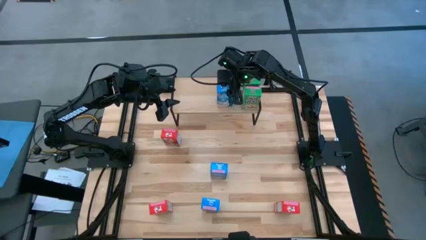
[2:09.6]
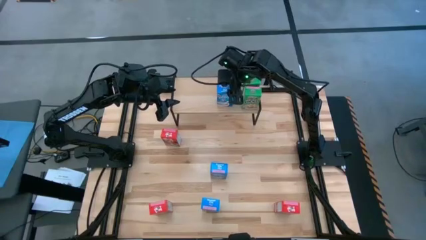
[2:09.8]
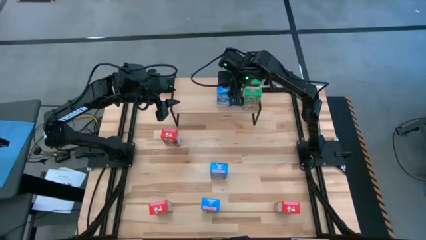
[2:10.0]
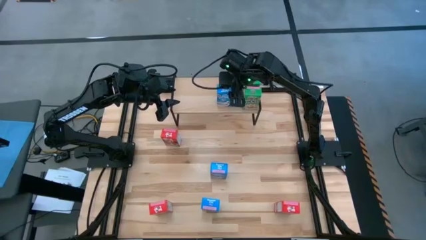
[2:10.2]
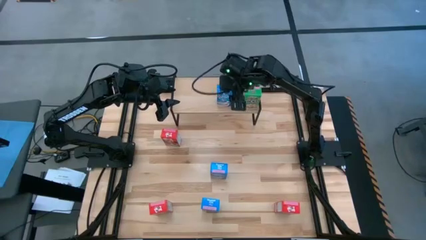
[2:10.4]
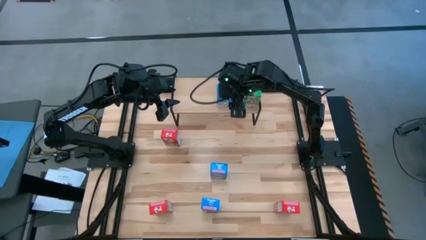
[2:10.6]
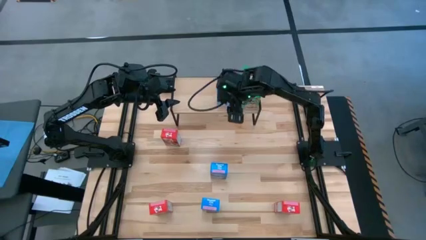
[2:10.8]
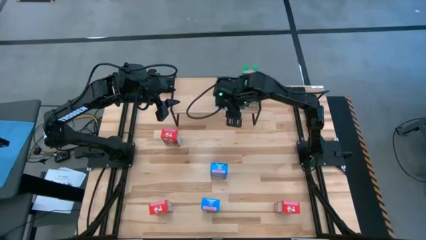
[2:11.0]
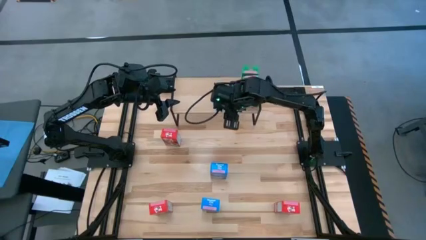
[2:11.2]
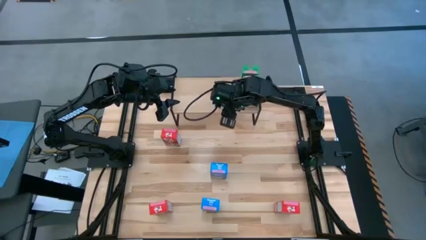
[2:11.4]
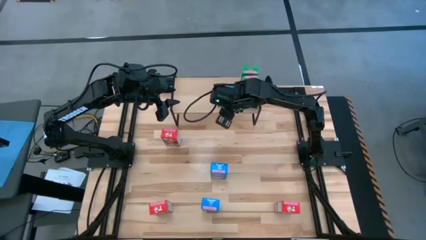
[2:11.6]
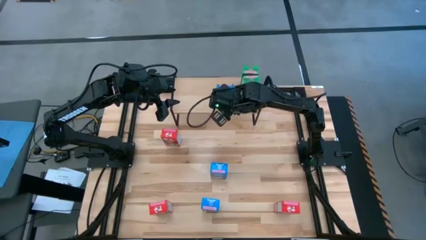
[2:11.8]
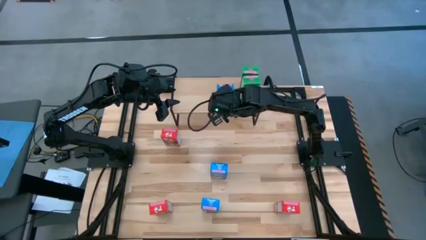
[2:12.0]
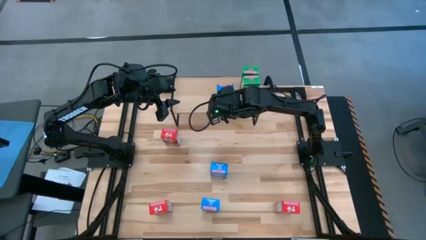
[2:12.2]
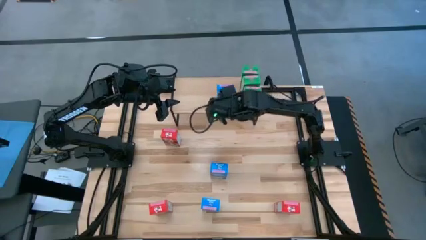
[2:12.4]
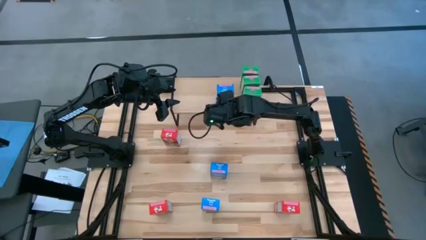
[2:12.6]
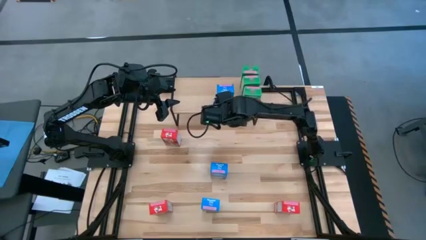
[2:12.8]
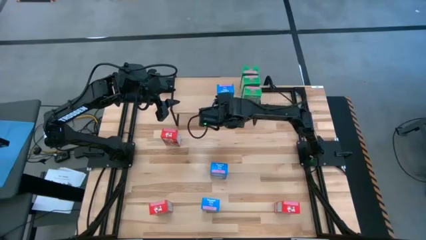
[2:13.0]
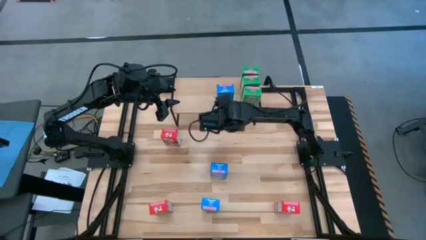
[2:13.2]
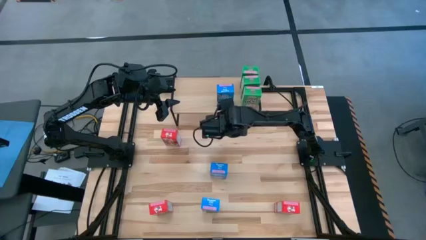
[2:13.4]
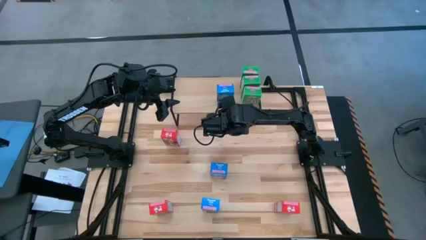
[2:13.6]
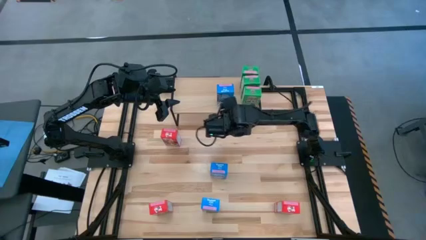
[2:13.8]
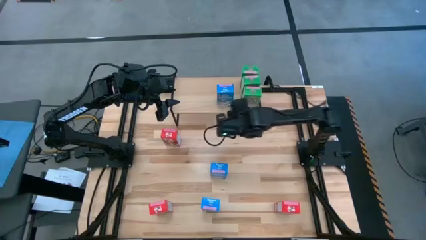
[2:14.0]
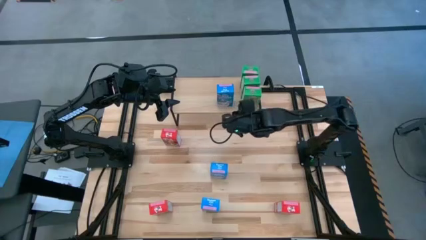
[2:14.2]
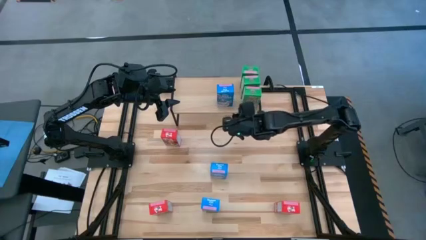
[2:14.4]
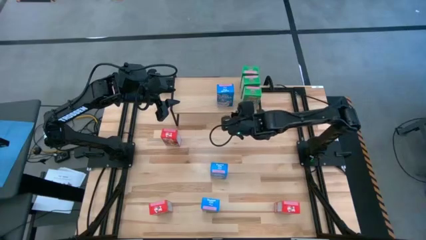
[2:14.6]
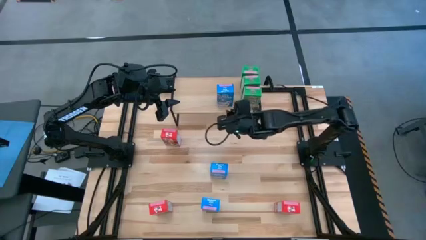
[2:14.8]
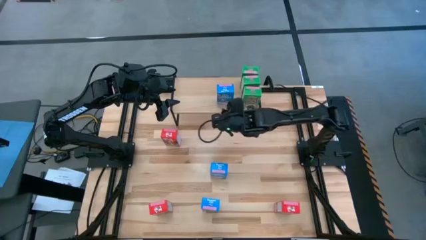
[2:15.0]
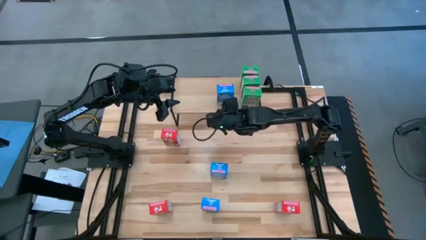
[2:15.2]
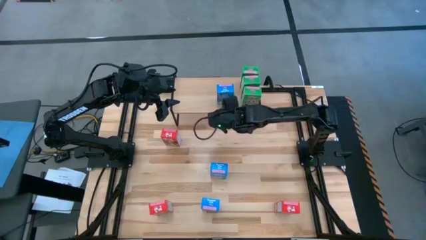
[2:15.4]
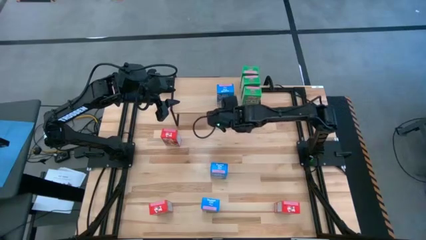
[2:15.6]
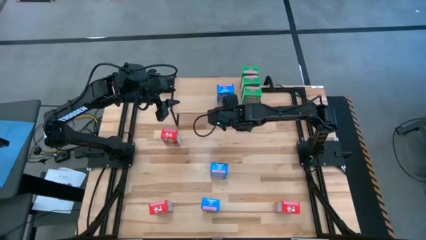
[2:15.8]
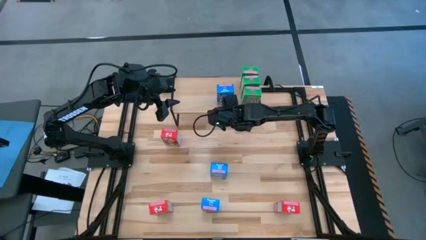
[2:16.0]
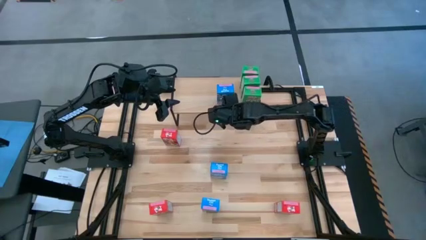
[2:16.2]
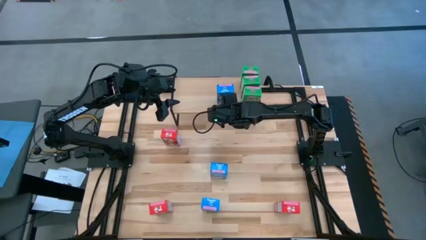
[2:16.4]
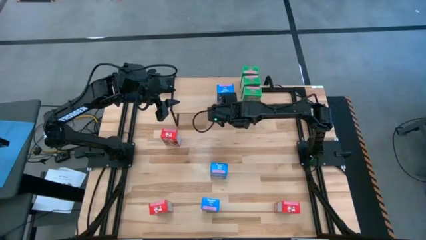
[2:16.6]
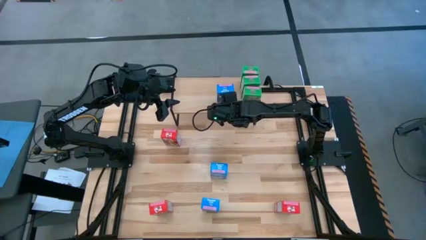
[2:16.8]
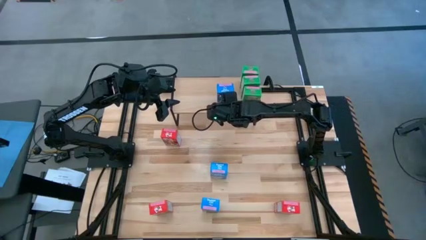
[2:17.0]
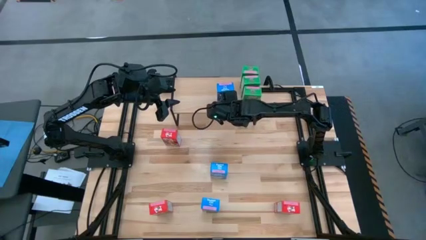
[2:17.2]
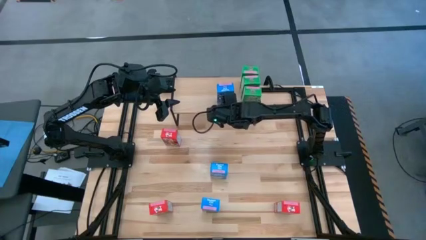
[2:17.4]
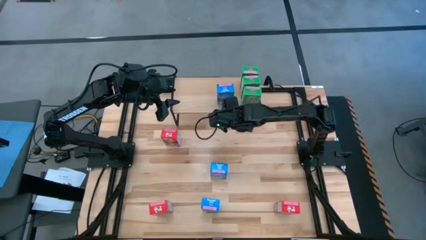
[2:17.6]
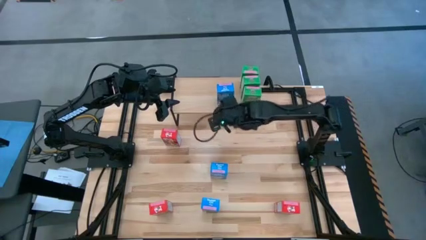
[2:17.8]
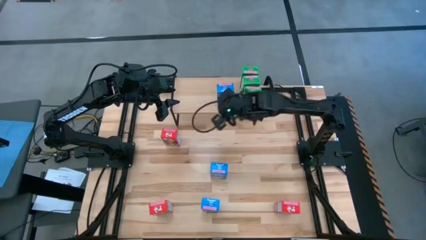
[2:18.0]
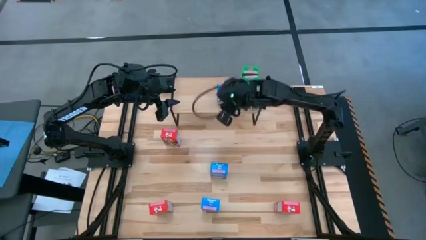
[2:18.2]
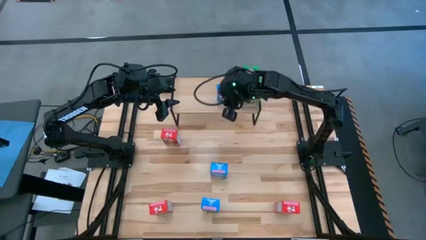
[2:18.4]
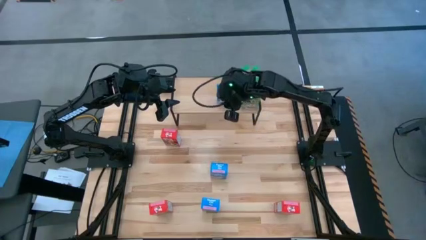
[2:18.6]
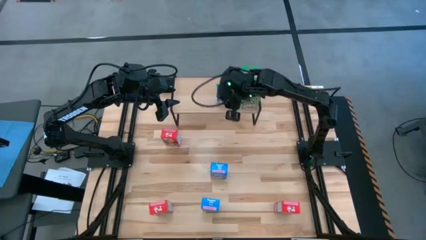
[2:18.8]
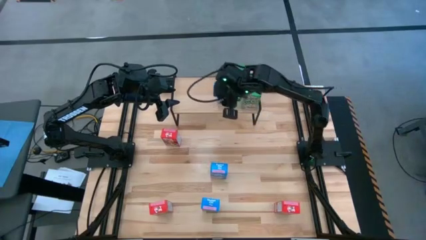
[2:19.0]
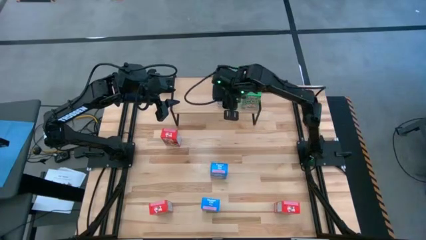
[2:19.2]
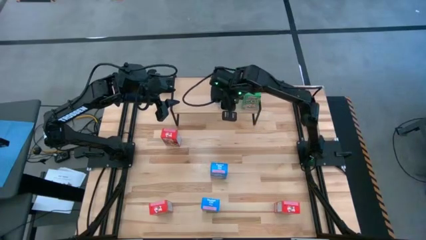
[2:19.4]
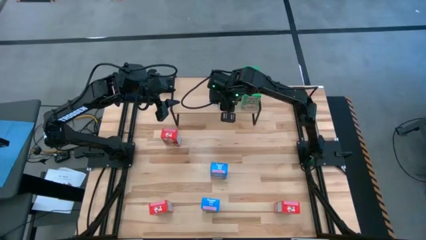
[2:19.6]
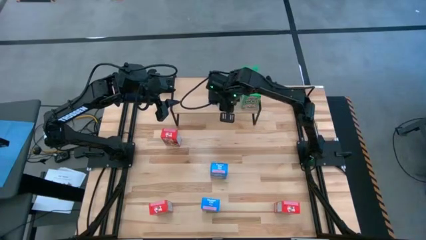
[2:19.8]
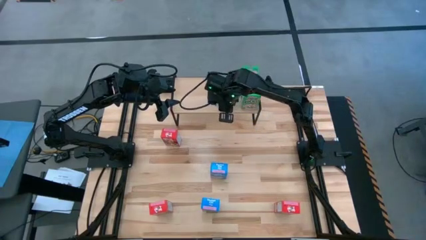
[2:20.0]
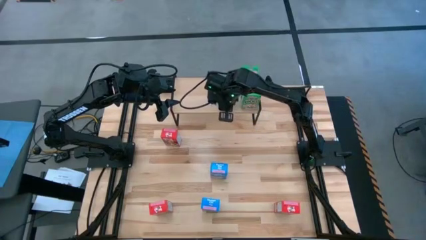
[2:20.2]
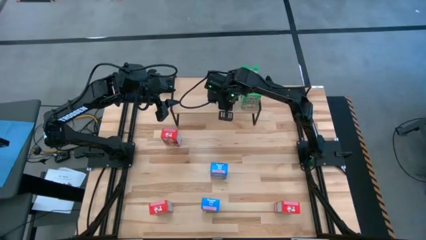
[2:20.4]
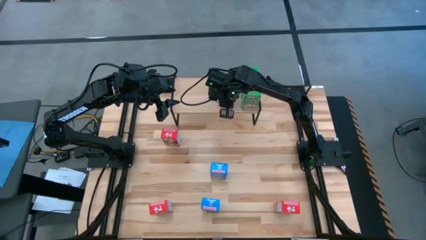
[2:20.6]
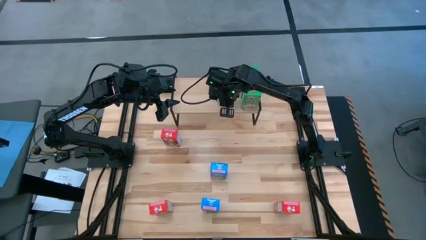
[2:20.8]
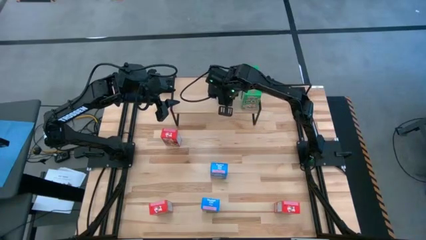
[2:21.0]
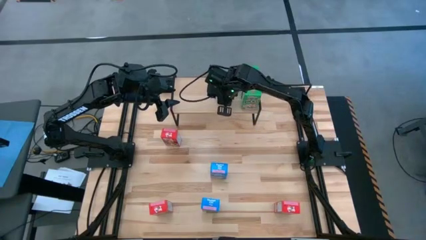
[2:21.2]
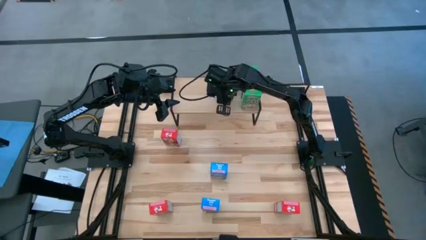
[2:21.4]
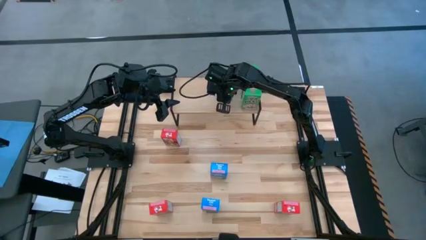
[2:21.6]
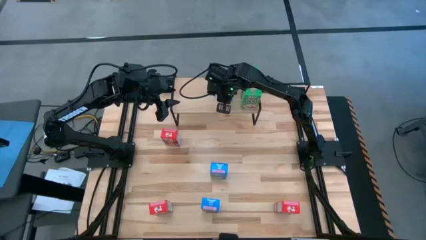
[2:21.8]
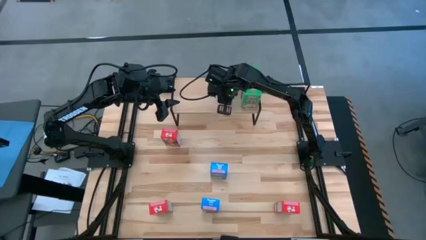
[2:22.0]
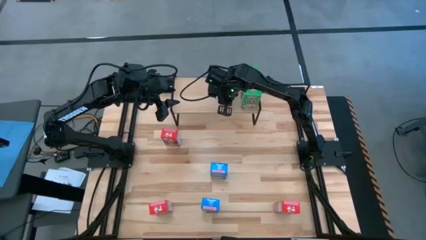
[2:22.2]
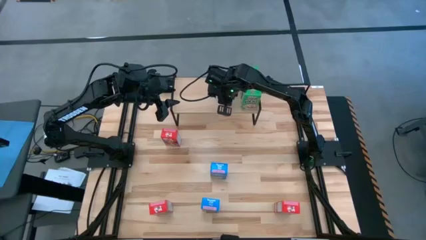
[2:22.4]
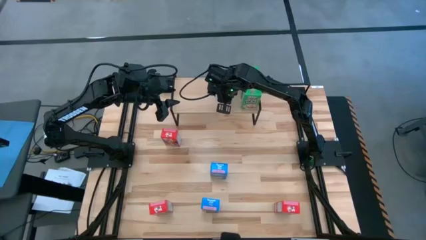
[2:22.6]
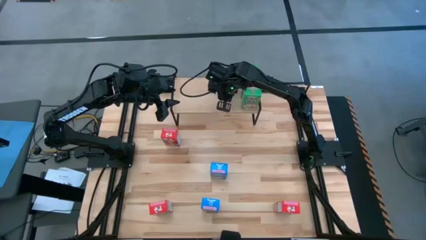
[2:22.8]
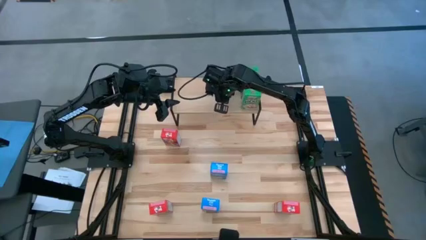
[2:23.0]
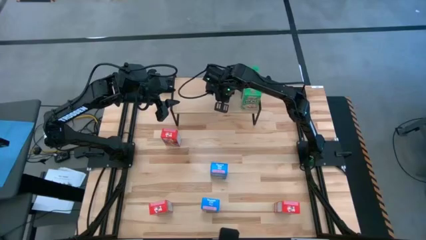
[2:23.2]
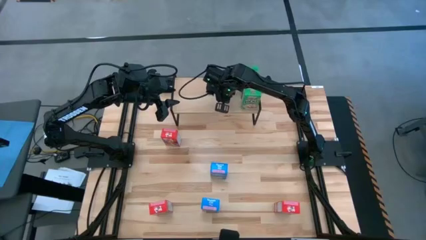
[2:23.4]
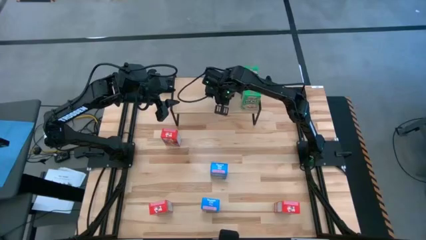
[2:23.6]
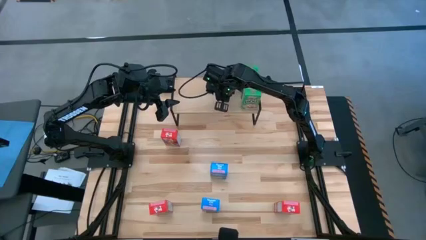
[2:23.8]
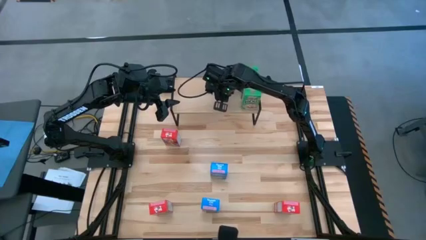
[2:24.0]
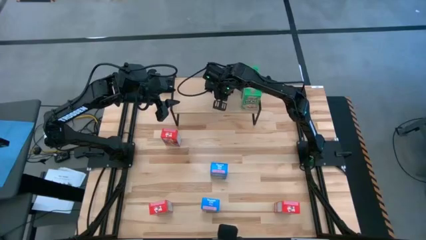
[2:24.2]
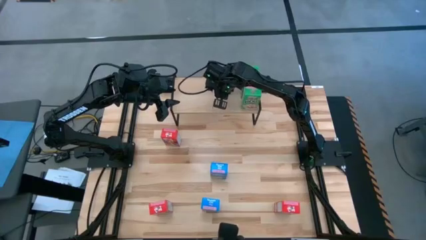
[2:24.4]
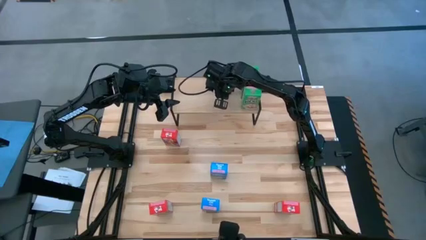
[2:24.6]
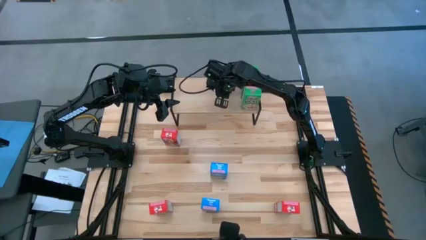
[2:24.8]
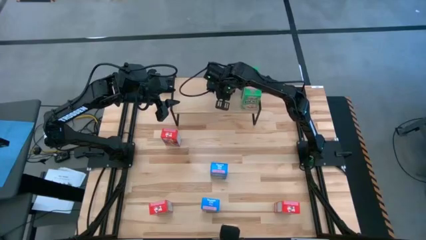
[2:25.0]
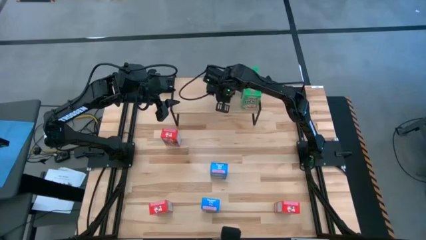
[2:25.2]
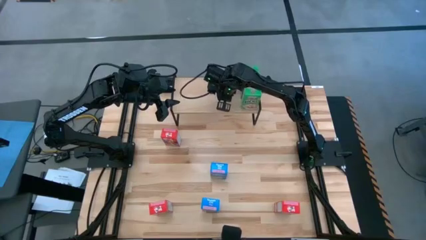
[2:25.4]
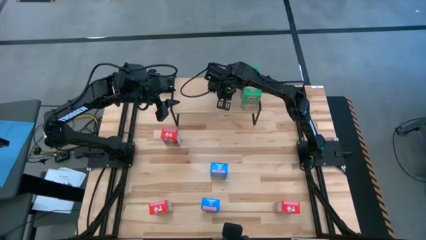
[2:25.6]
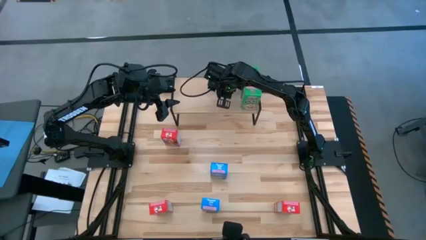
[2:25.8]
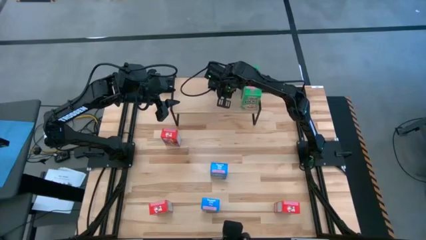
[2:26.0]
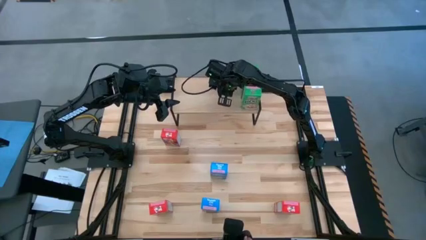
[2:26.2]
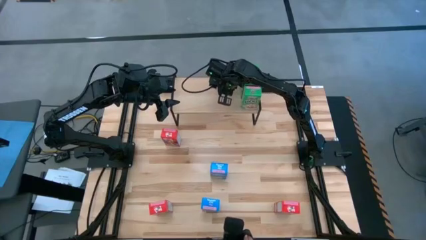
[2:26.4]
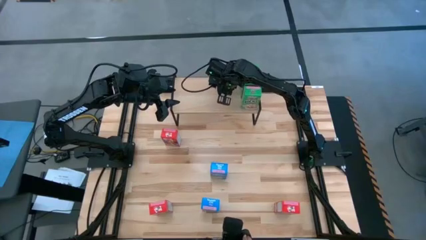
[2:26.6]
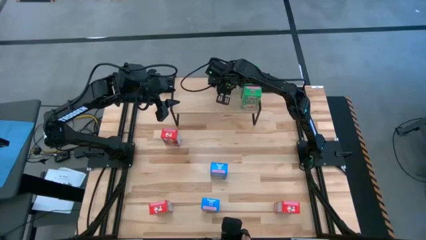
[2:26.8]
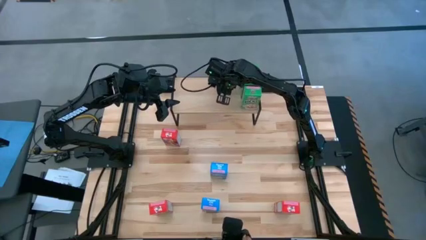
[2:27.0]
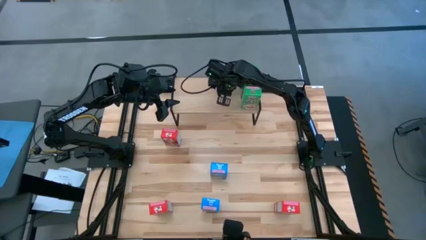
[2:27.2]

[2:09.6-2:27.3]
Task: Stack cereal on shelf
Put the top blue cereal box on the shelf
